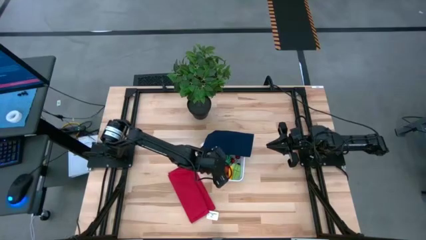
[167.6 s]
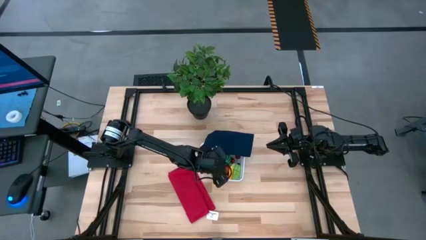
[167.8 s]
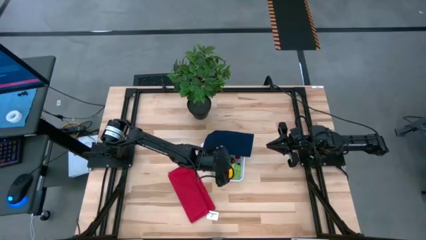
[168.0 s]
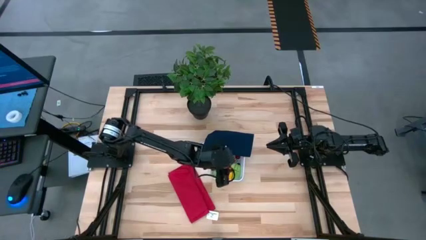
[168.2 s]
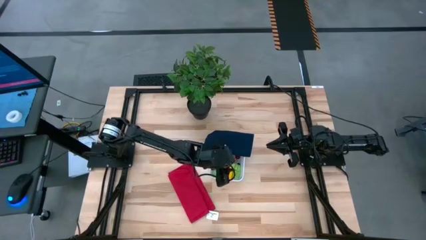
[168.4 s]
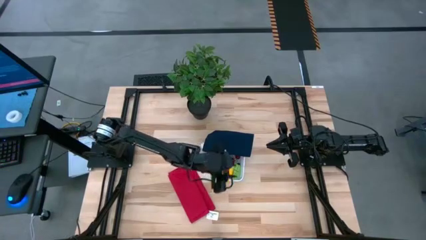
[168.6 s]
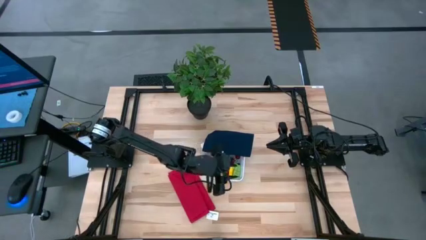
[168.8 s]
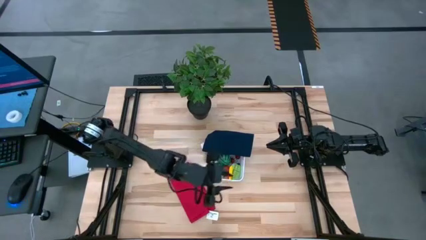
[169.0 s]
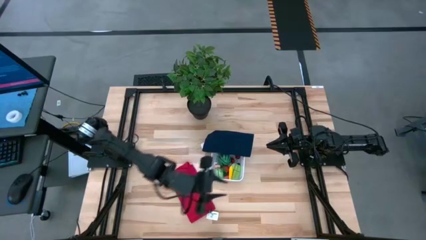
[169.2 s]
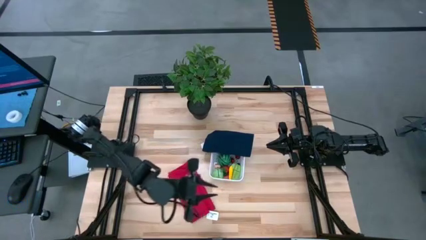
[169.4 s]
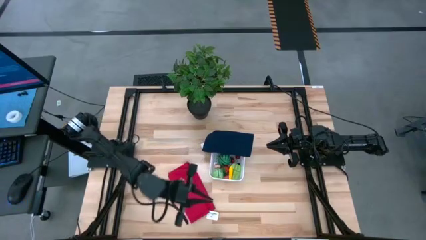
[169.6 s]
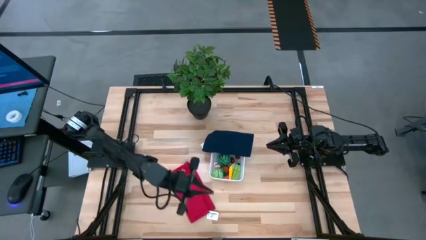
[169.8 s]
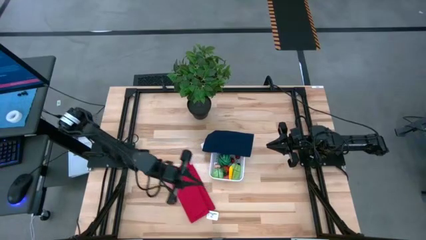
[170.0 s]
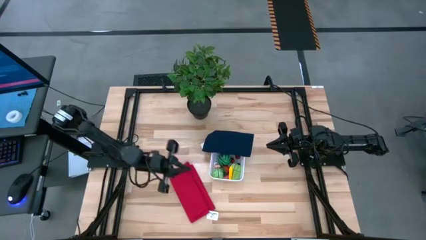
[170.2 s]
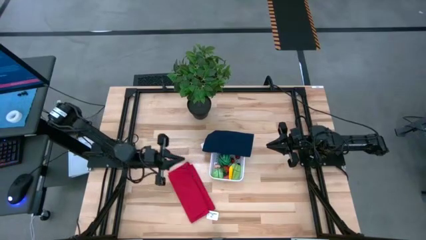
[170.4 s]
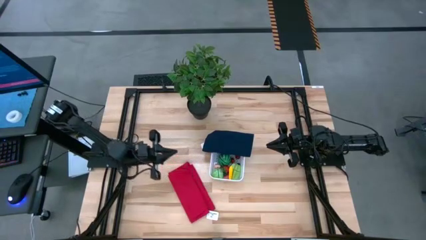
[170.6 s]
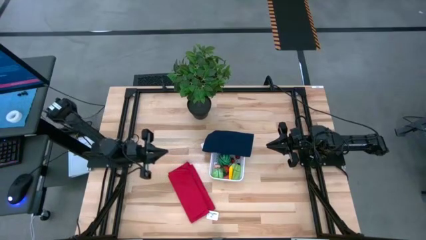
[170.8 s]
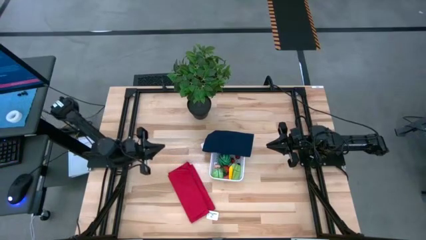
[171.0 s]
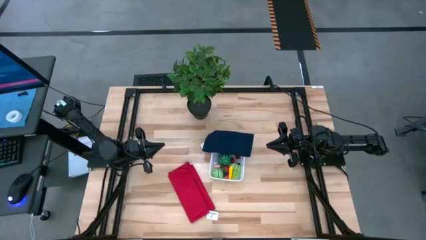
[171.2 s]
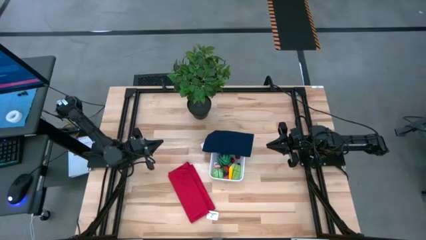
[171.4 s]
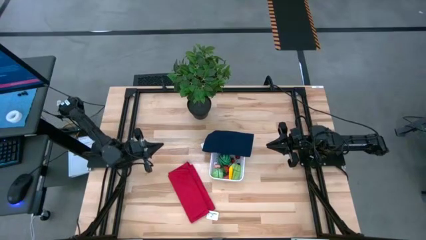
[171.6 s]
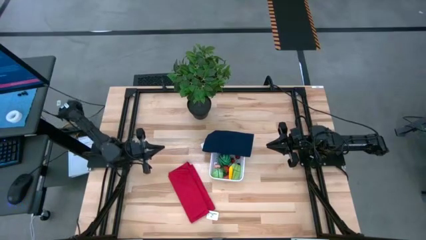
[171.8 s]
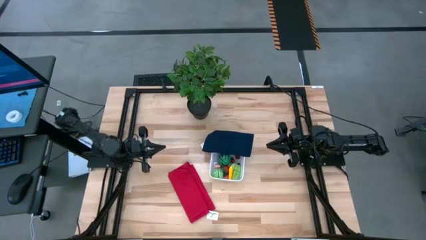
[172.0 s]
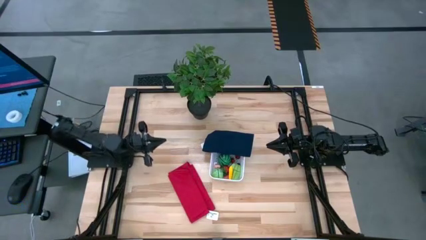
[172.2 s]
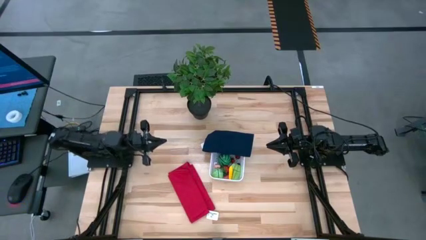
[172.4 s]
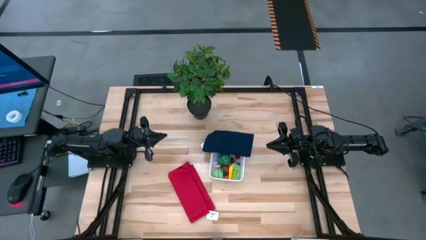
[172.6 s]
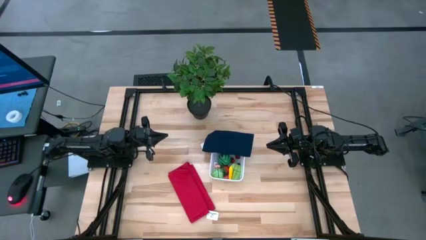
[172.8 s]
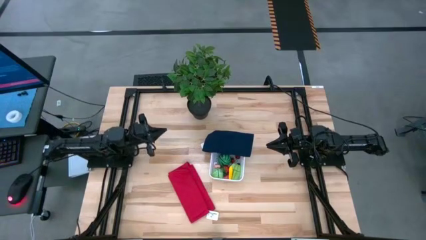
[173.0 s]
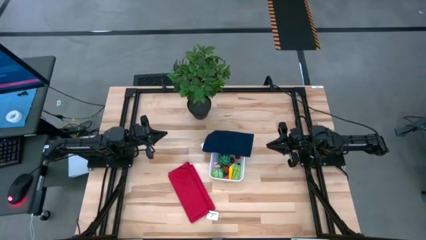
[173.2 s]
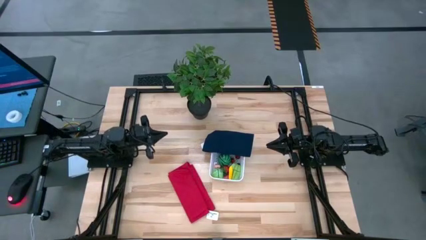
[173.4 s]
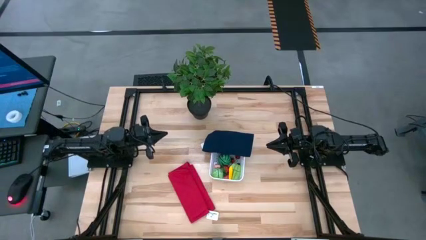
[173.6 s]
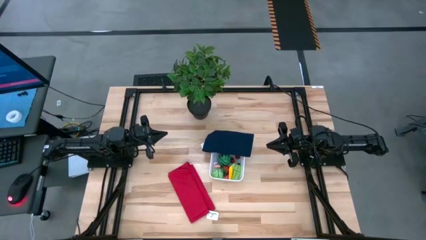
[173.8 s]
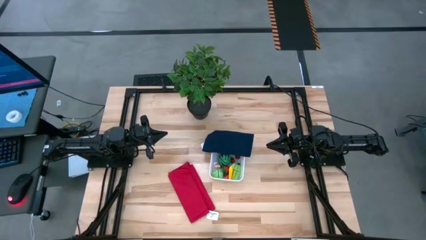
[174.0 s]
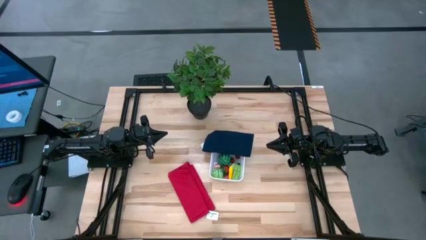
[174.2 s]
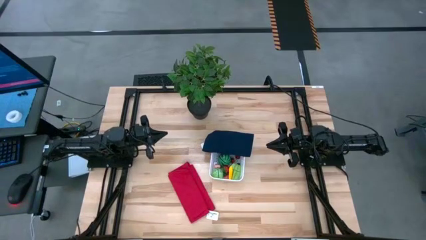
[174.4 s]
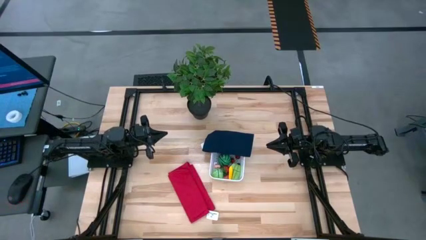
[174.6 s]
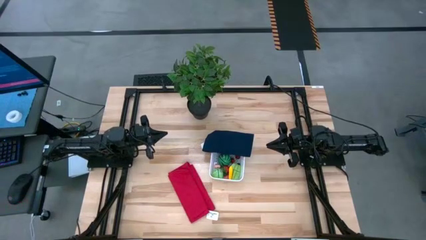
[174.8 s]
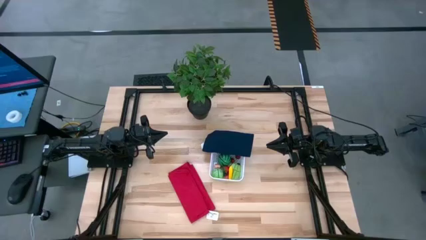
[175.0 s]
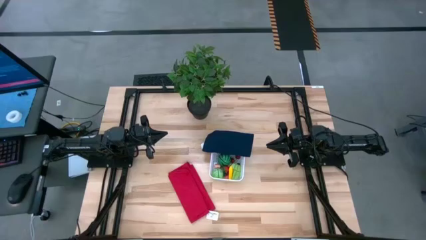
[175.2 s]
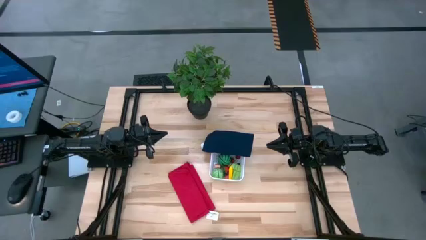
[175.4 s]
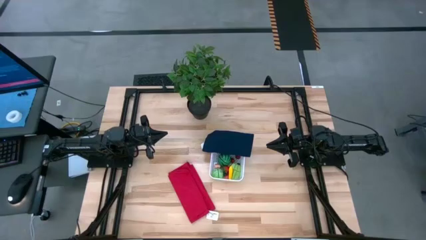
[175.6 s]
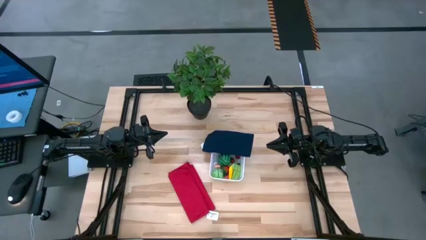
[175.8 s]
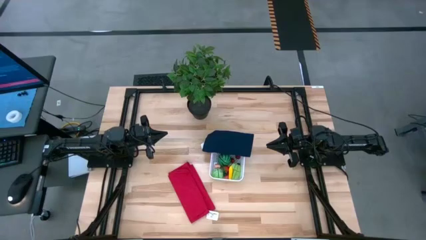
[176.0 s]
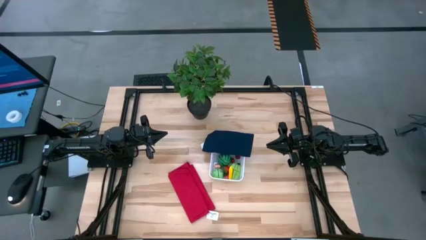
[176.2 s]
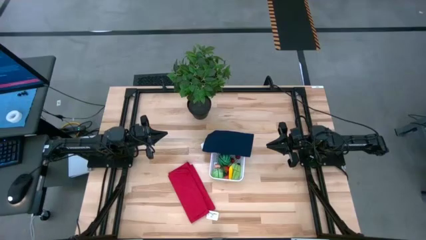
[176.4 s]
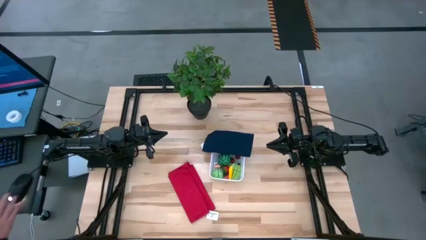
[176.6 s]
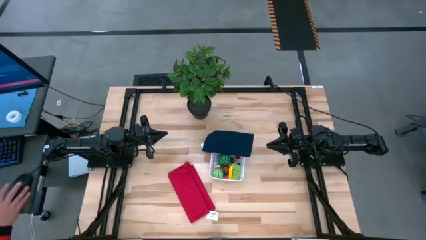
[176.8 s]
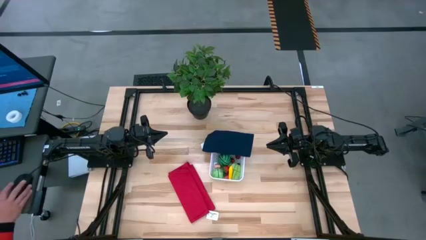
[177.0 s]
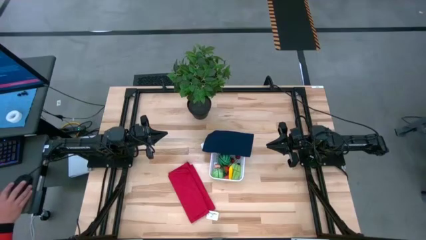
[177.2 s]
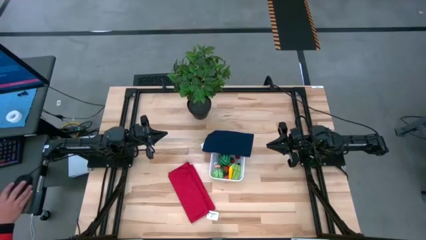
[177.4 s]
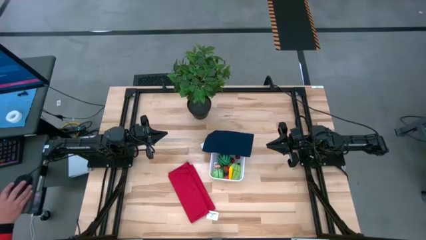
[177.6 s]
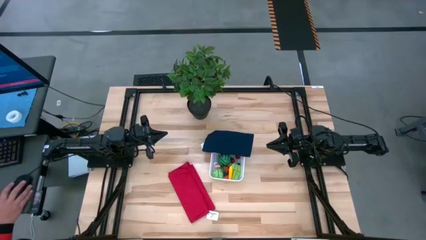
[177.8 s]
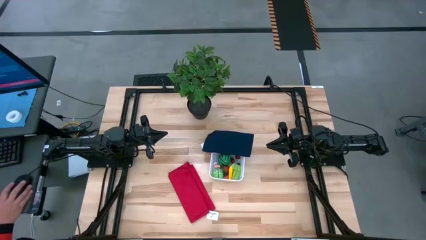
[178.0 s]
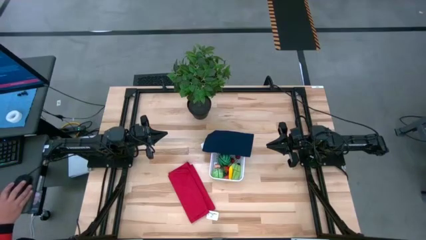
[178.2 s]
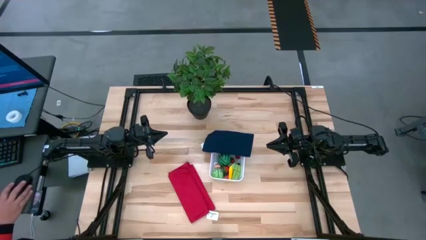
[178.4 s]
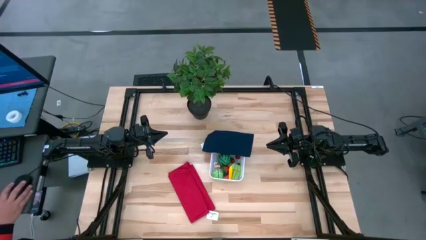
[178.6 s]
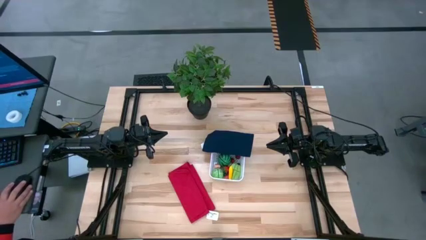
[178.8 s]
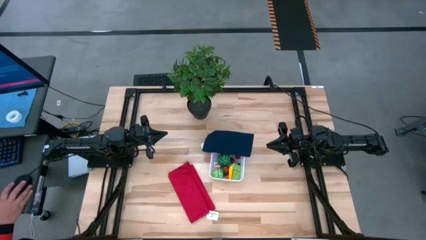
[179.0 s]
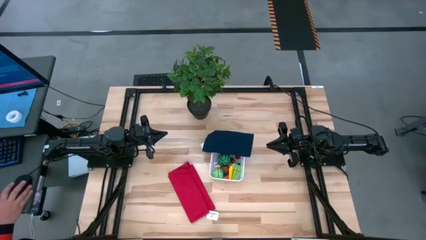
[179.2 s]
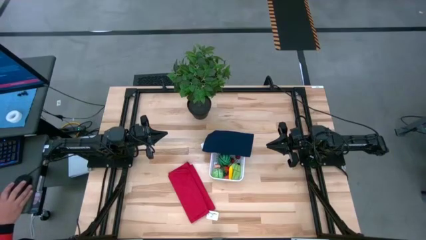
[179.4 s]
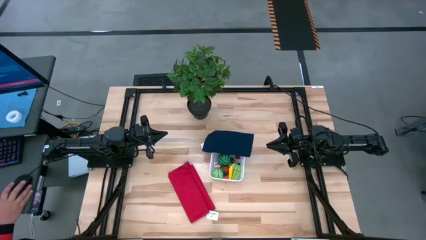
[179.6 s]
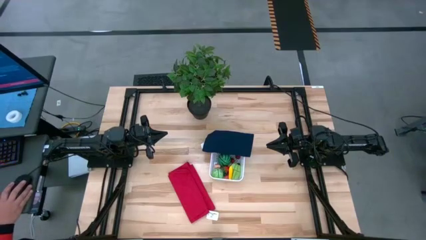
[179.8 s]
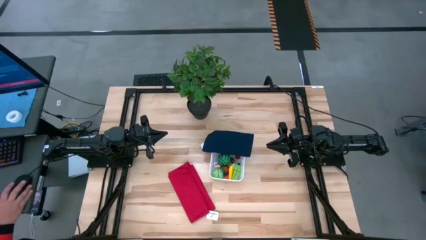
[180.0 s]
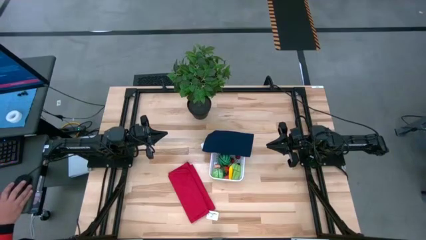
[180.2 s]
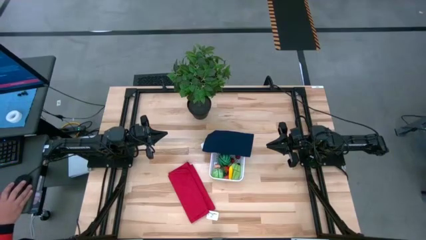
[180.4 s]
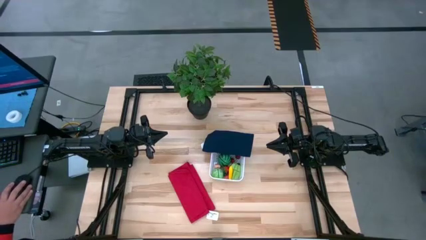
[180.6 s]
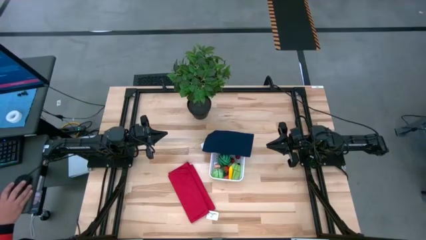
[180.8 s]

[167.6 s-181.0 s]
Task: Pick and placing Produce into tupperware
Return to Home Position

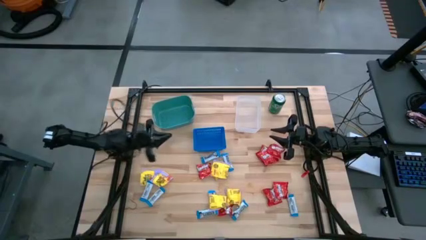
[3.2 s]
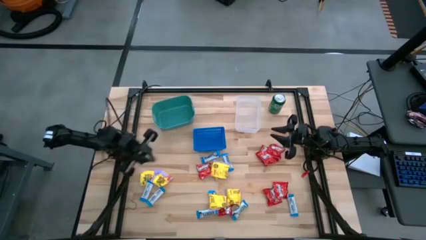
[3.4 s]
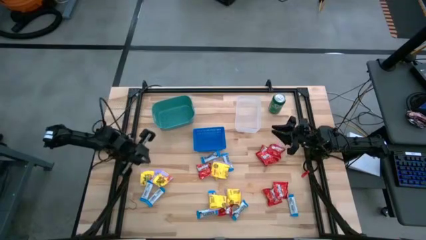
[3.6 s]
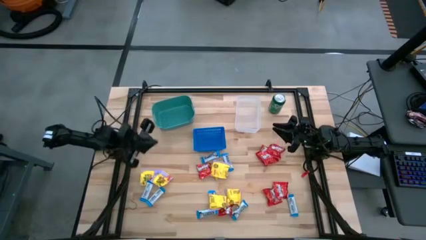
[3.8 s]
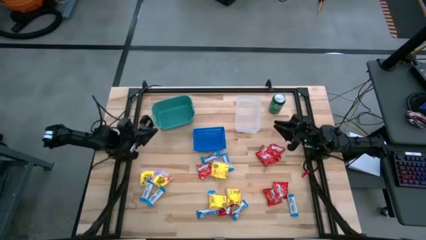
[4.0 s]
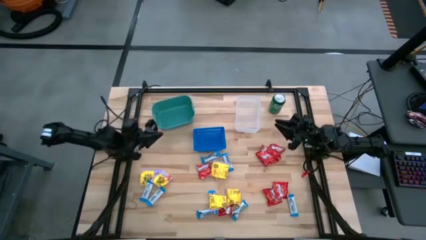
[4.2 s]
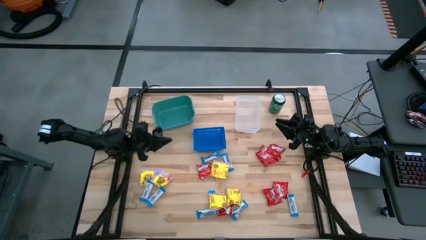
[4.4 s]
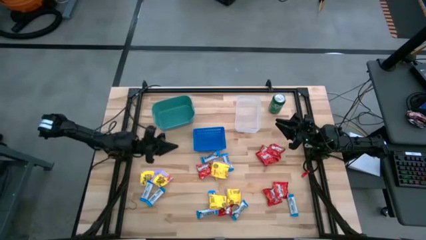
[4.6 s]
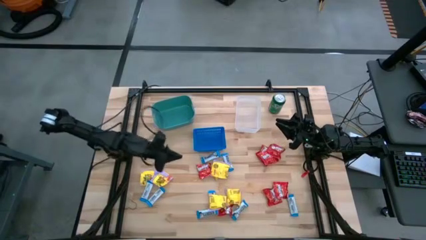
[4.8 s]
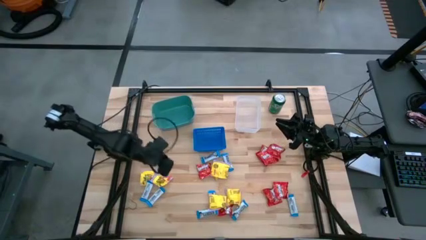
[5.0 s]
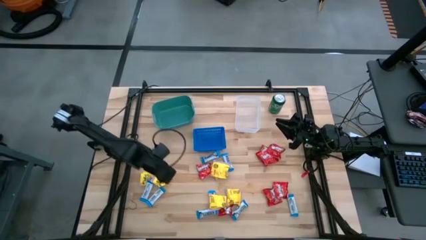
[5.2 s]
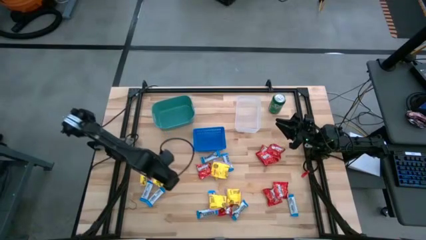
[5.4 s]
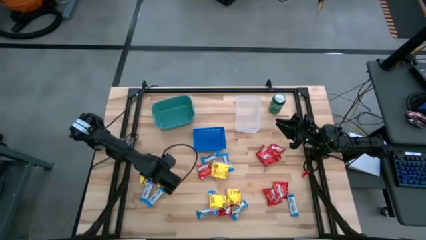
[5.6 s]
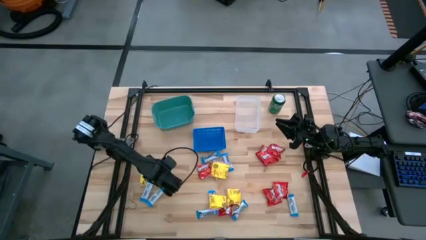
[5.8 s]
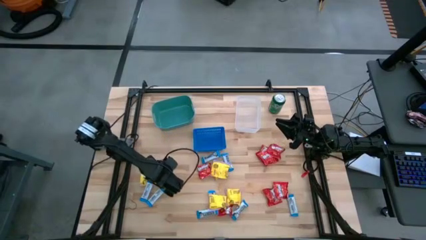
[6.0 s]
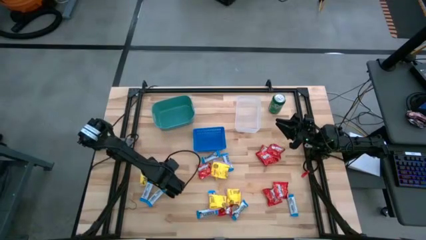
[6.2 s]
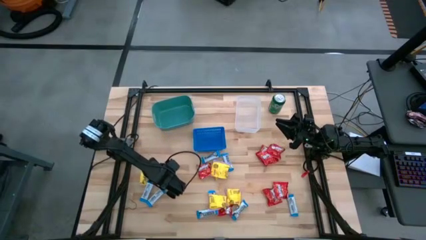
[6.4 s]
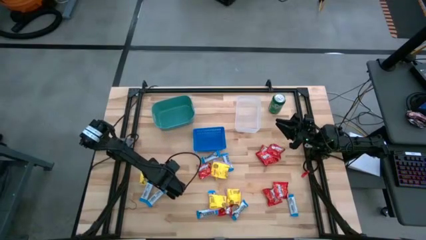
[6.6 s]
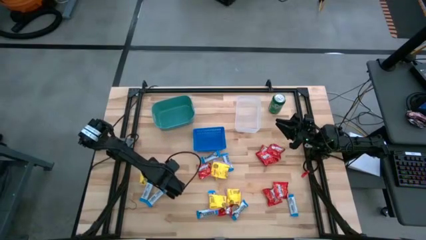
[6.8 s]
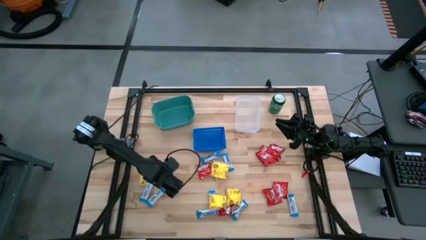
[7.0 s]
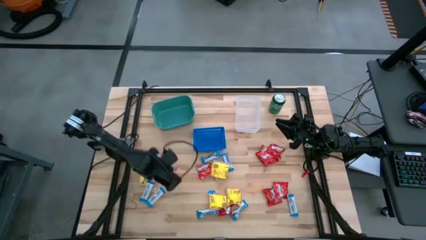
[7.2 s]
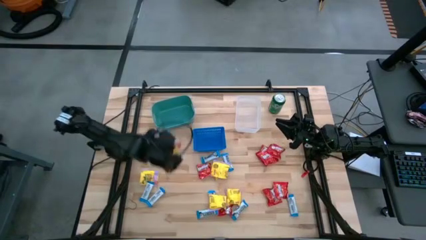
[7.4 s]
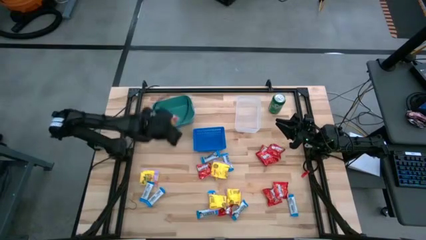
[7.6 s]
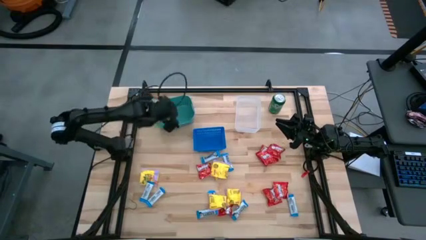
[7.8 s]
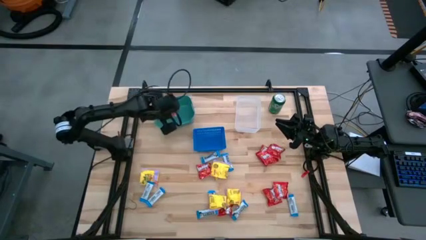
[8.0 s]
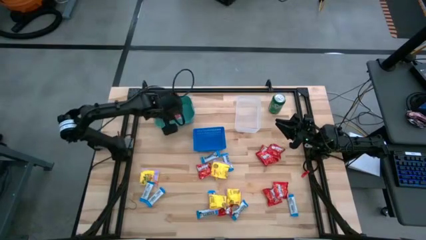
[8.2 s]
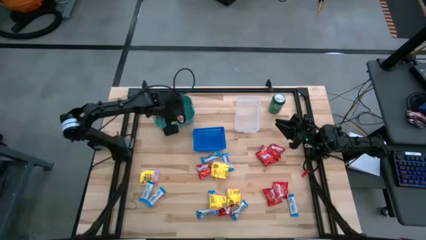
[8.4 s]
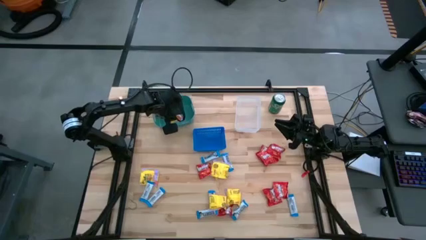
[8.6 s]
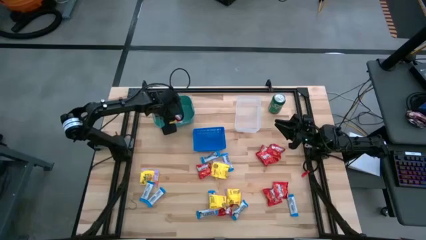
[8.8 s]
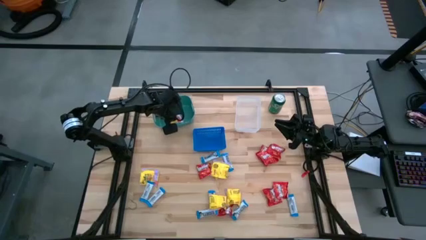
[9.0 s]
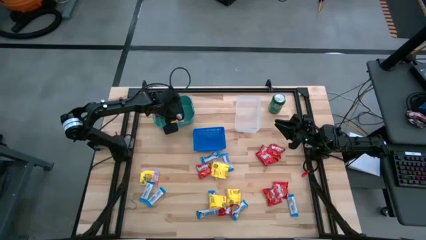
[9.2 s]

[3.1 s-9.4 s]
Task: Sort candy
Put the middle left sour patch candy into the blue green bin
